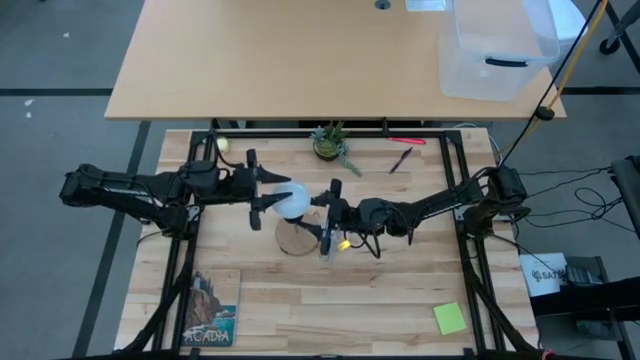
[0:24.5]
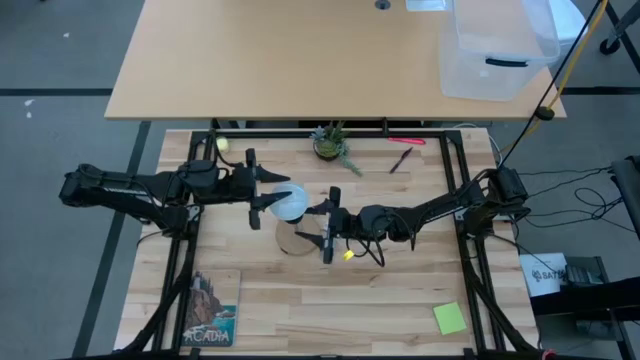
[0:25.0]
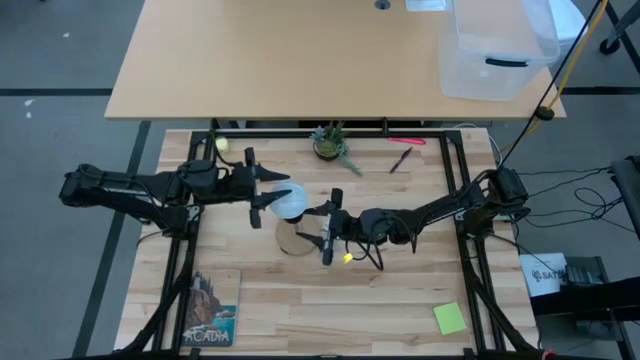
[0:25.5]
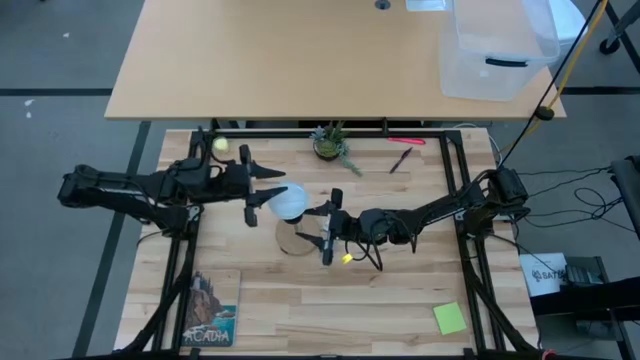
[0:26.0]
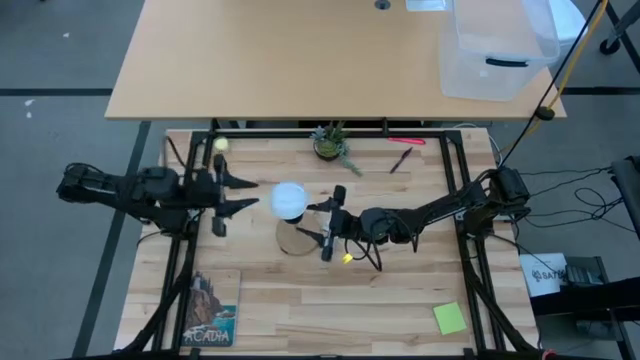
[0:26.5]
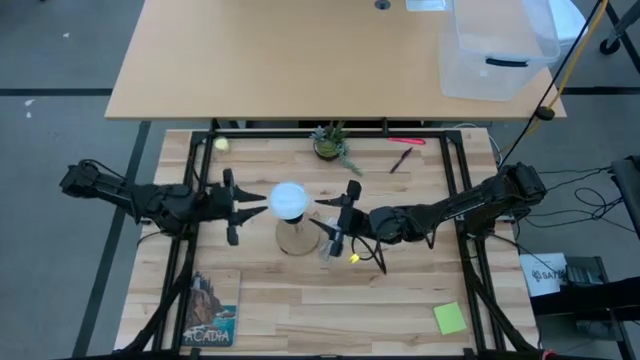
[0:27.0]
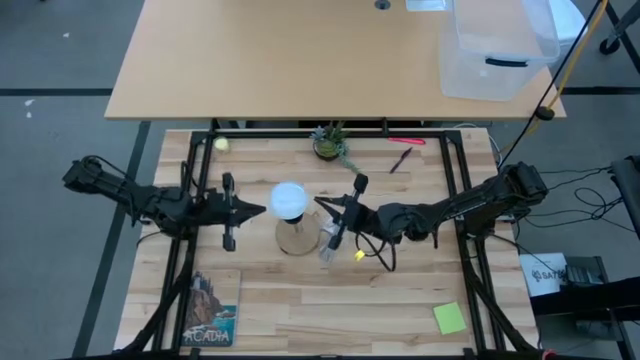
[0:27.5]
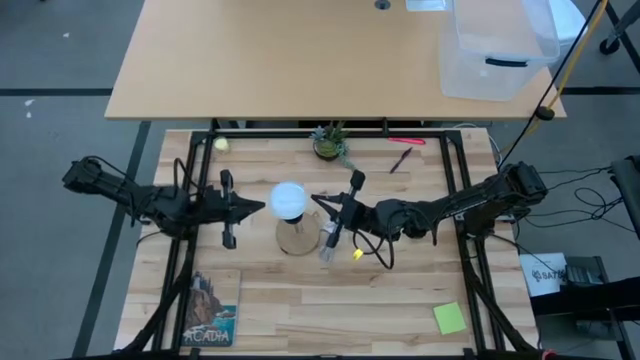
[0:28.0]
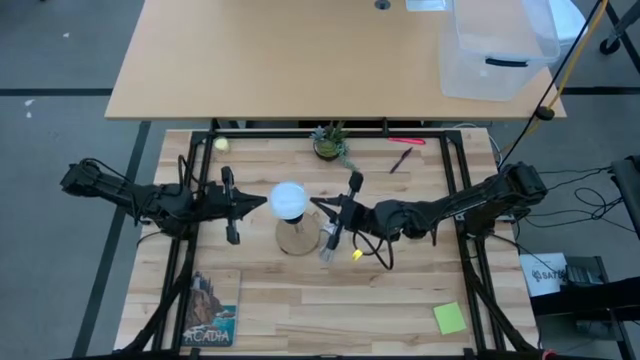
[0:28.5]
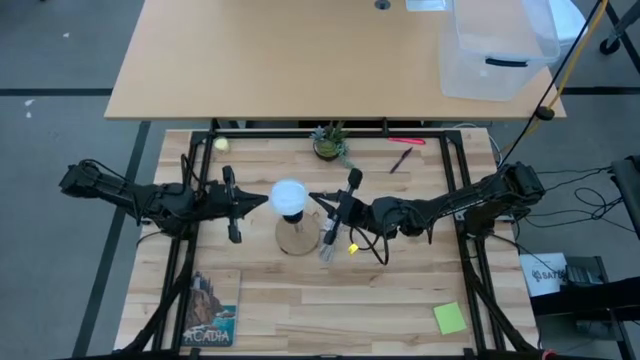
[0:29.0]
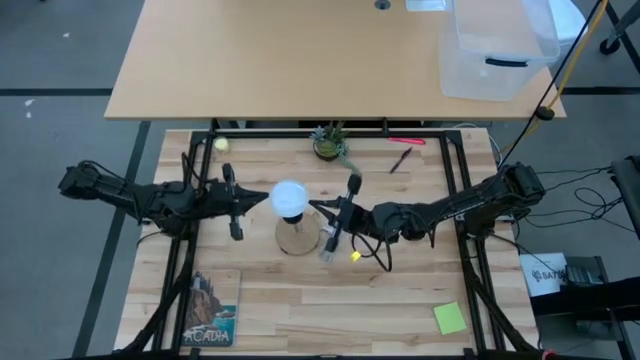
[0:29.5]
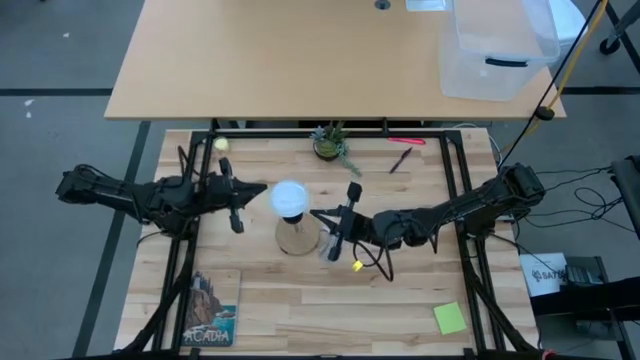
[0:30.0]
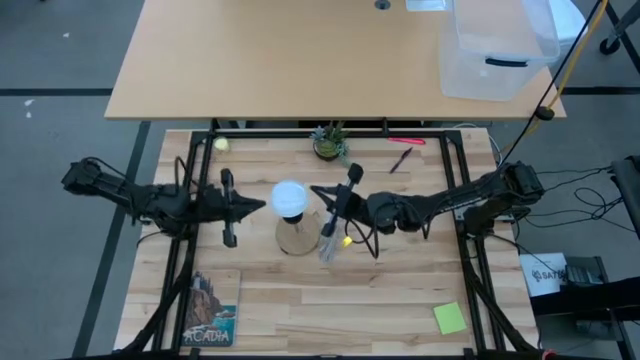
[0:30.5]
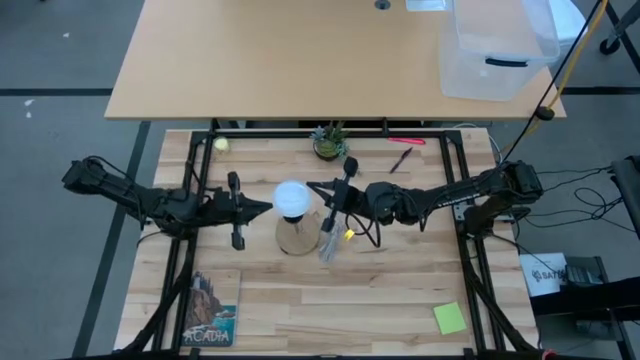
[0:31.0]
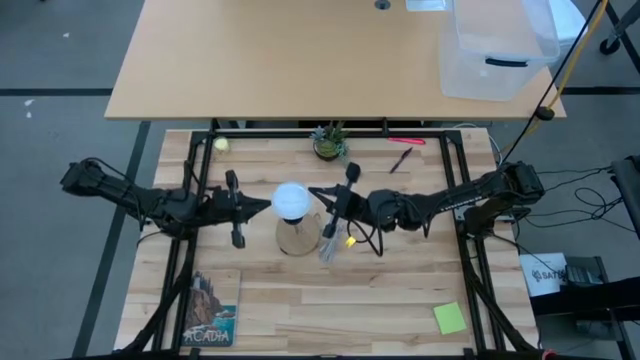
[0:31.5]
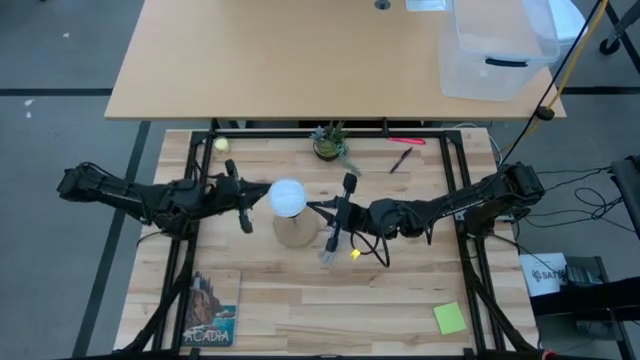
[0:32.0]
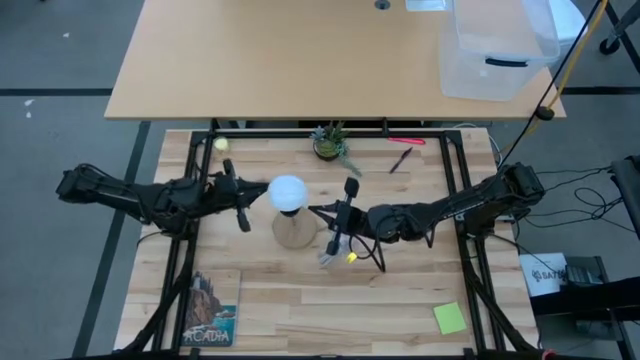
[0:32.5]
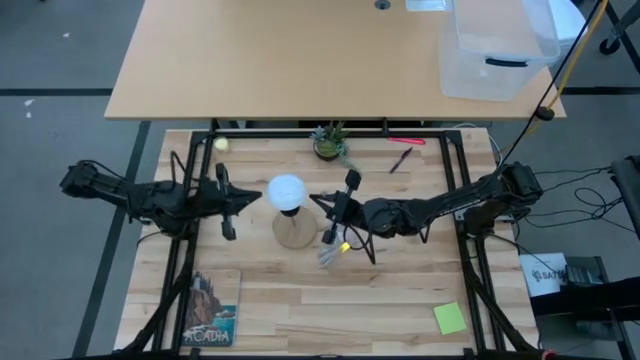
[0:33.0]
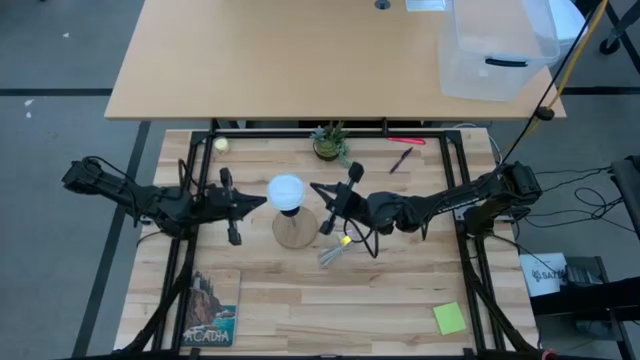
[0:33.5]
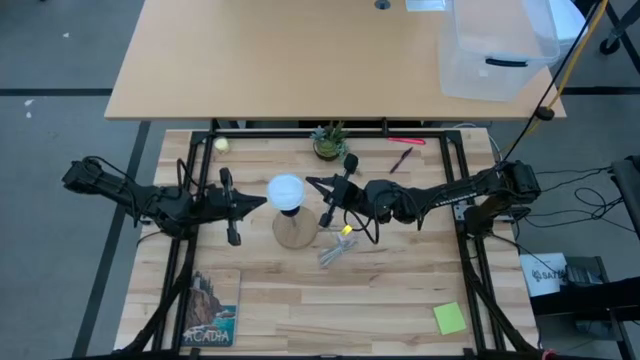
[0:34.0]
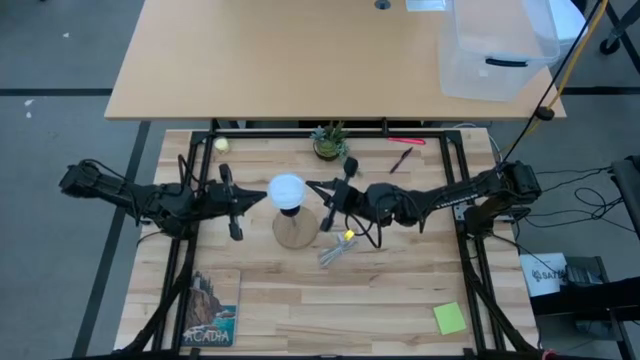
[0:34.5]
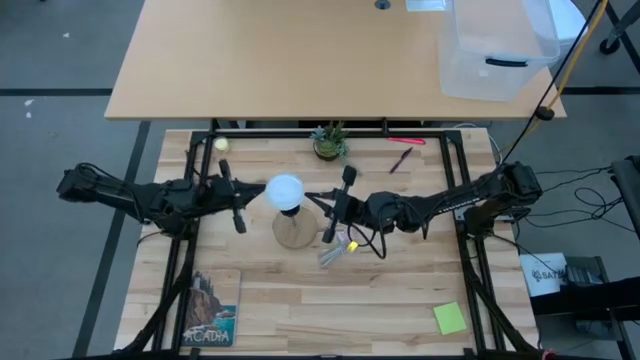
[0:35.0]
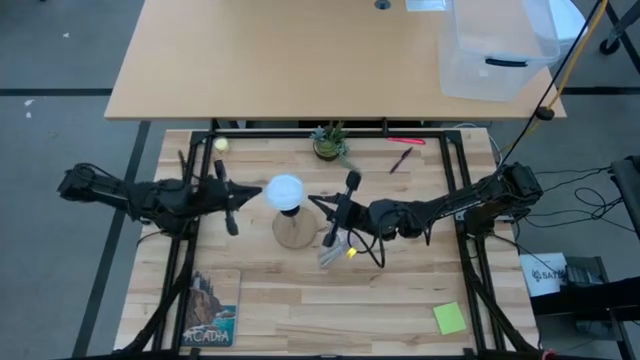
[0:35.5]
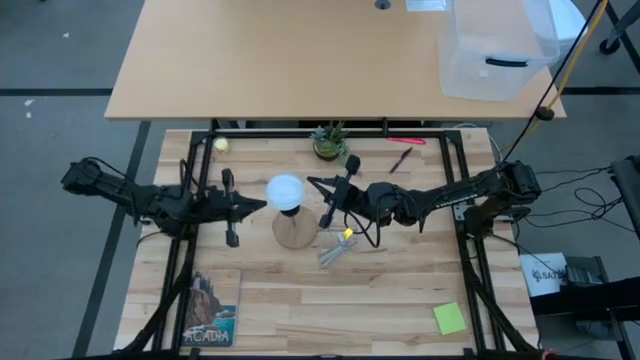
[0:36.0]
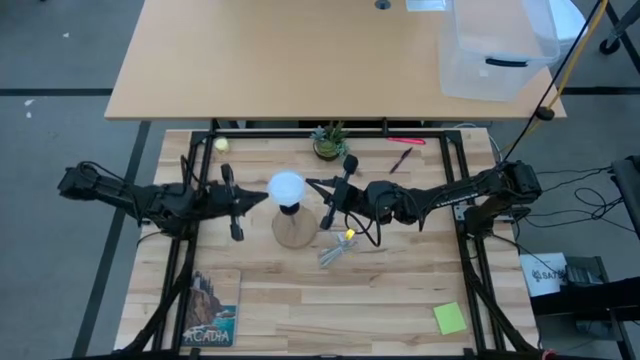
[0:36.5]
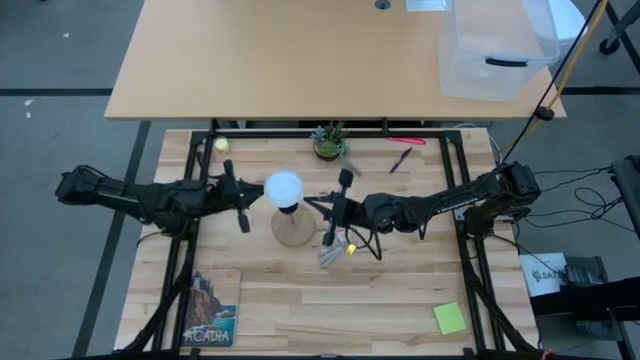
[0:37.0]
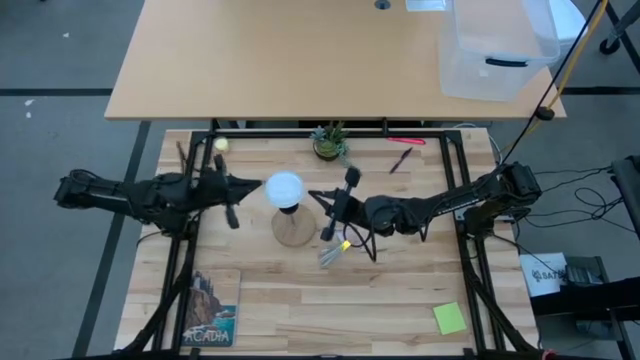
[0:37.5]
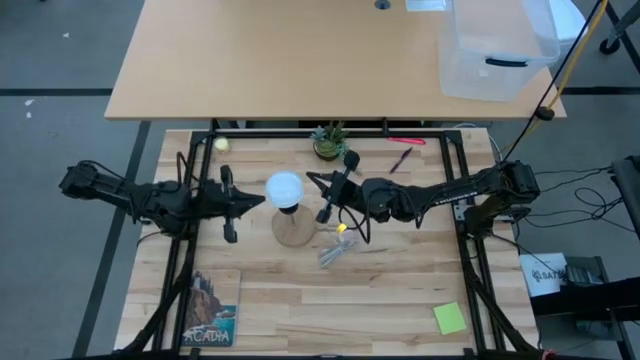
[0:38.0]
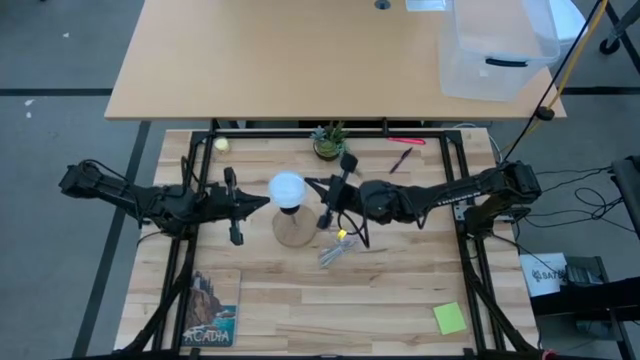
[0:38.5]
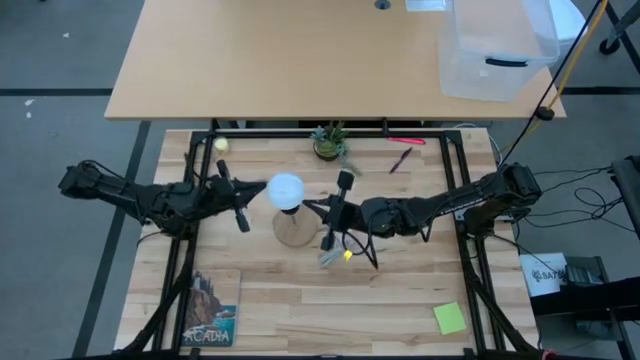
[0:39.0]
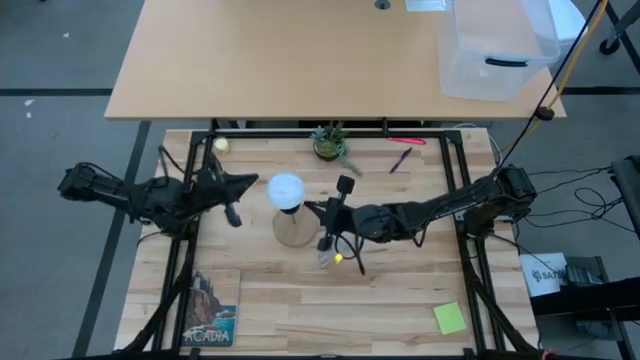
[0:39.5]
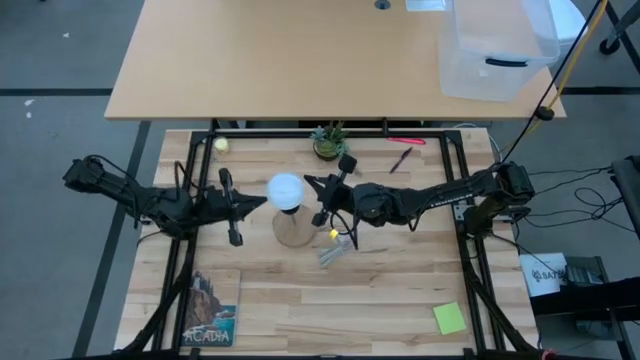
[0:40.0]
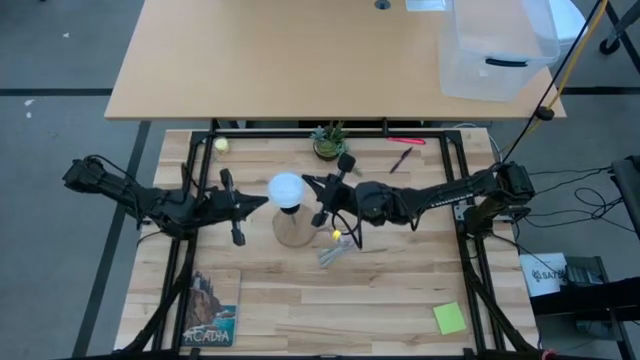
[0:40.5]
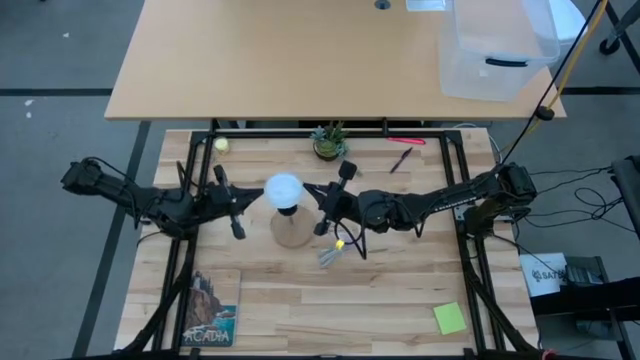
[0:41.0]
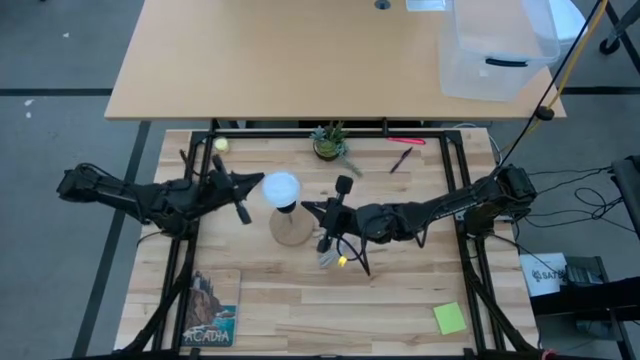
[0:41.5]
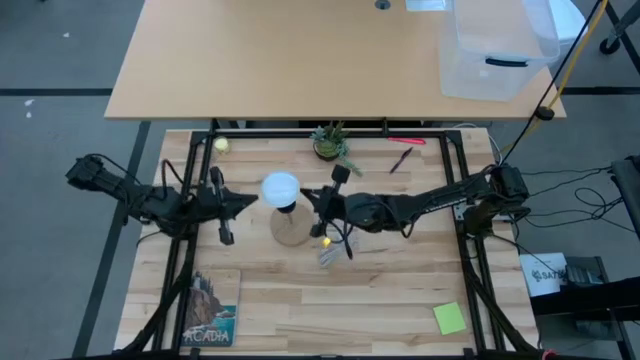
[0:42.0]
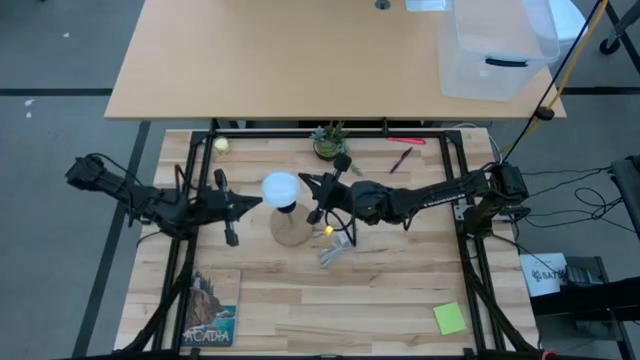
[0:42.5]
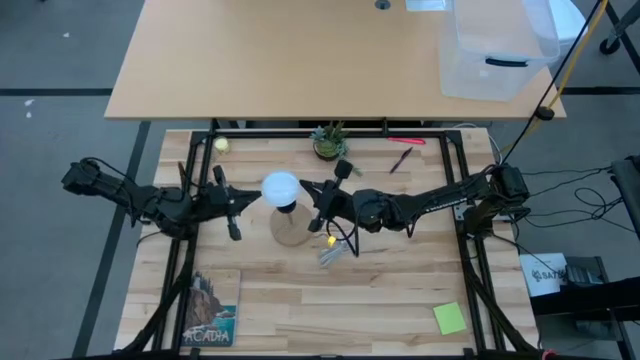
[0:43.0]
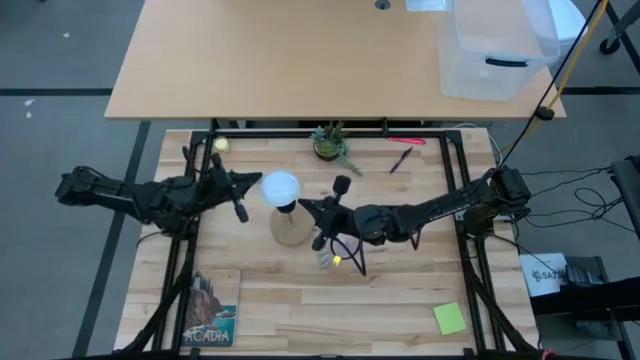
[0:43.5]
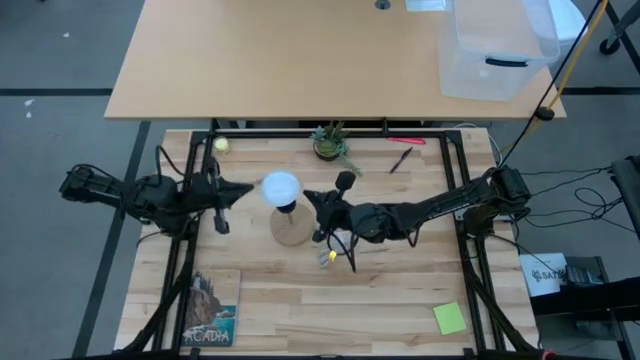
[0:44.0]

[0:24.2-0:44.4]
Task: Screw lightbulb
Insert the lightbulb into the lamp

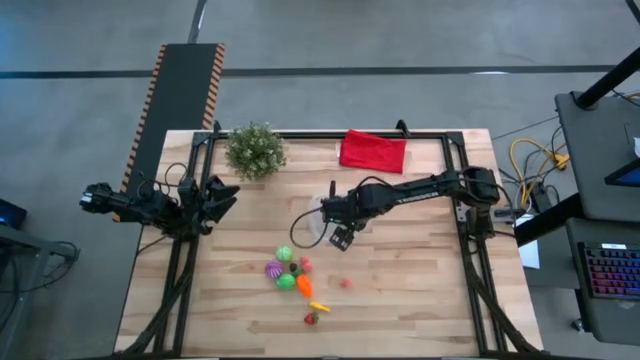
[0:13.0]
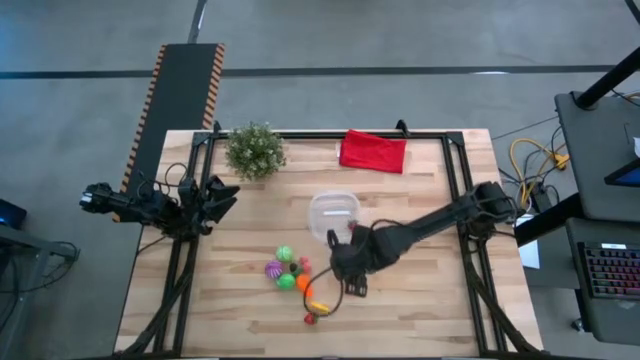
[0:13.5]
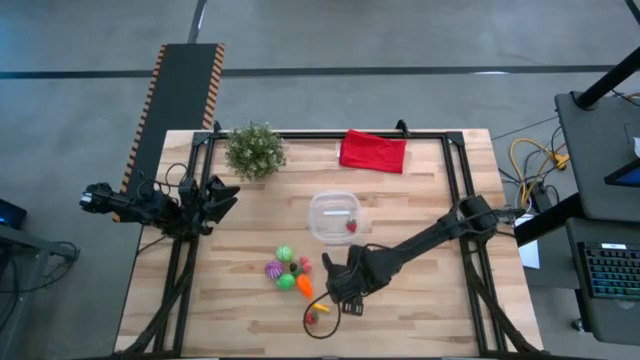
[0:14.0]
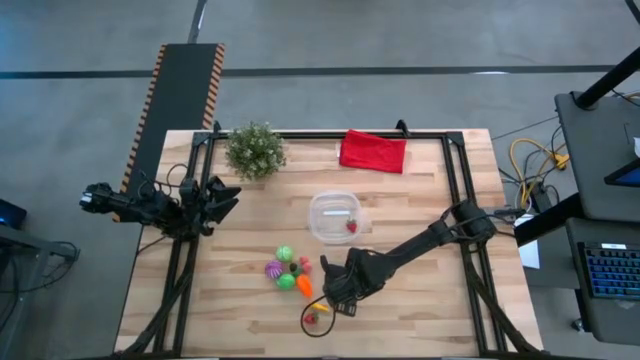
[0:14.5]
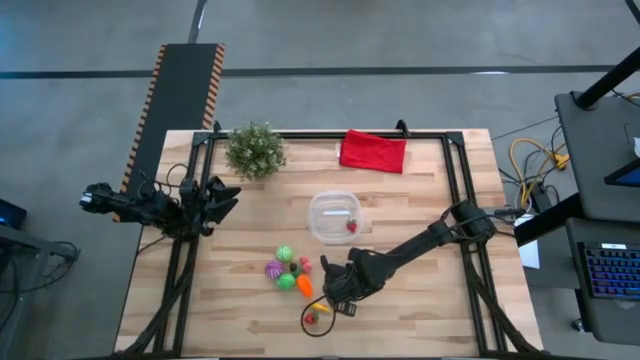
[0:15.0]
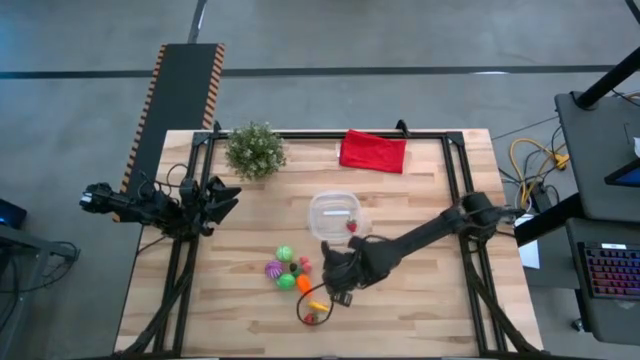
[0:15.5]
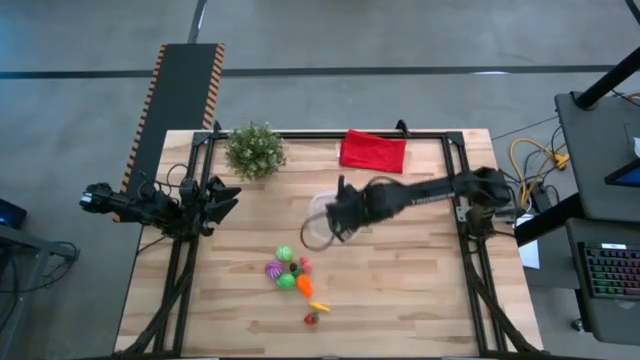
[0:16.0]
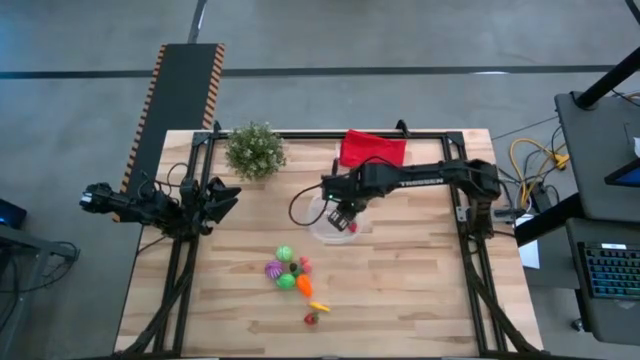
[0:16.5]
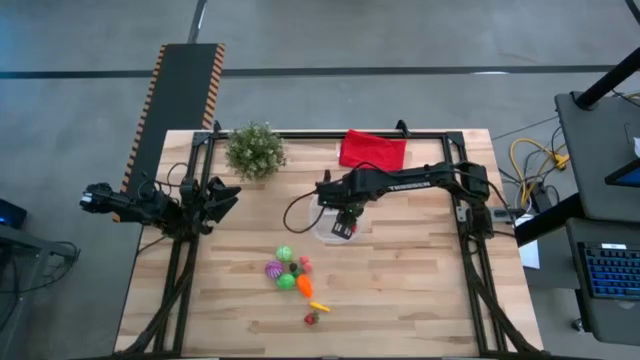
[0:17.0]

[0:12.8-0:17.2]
Task: Pick and placing Produce into tupperware
Put the bottom pink peach into the transparent container
